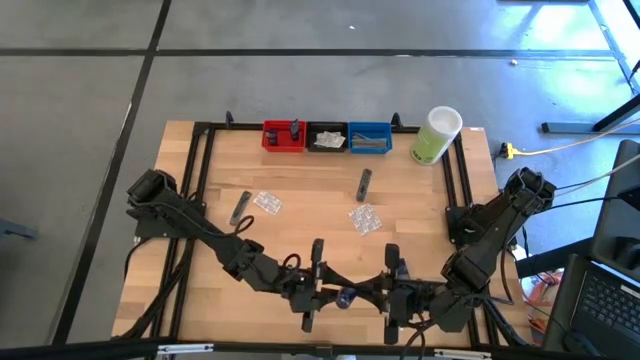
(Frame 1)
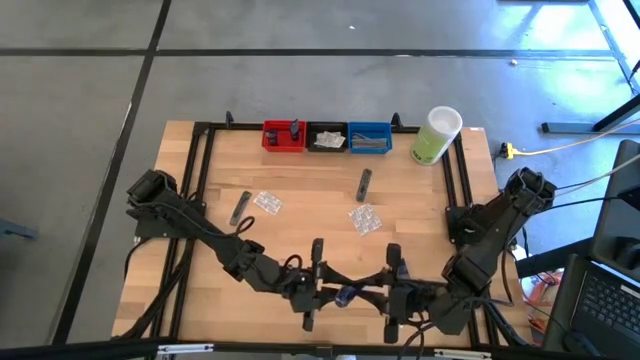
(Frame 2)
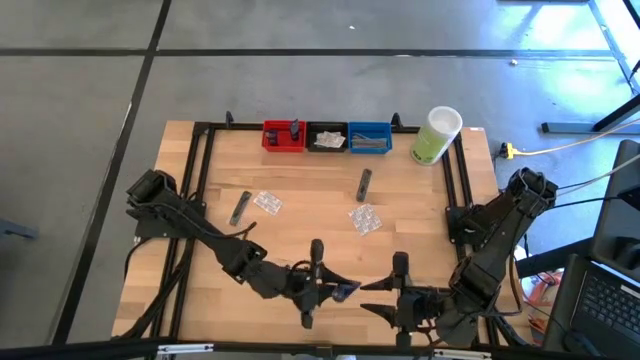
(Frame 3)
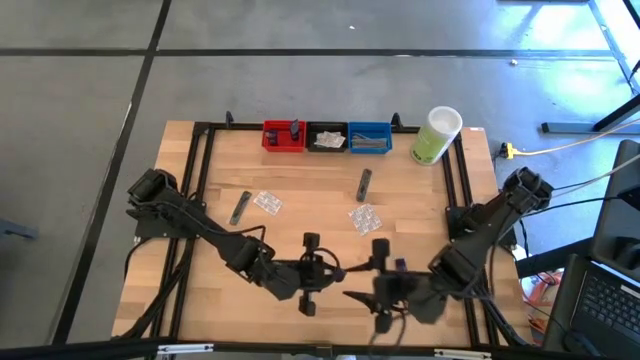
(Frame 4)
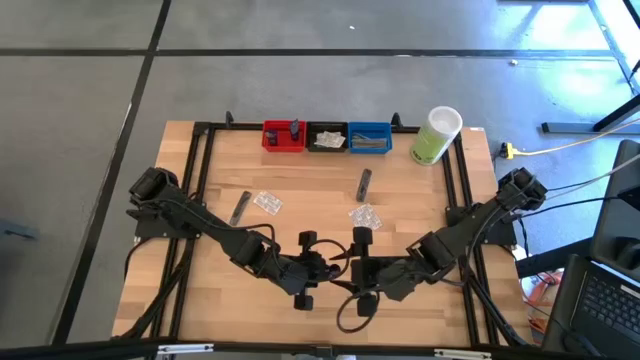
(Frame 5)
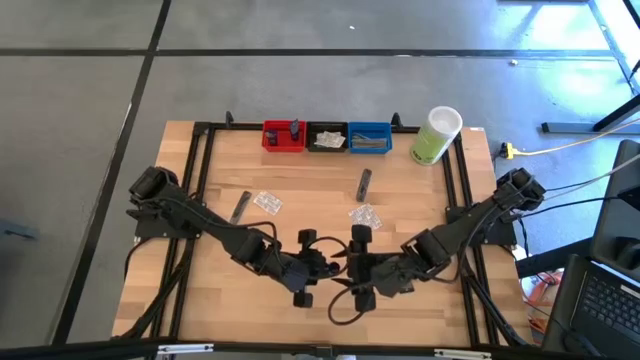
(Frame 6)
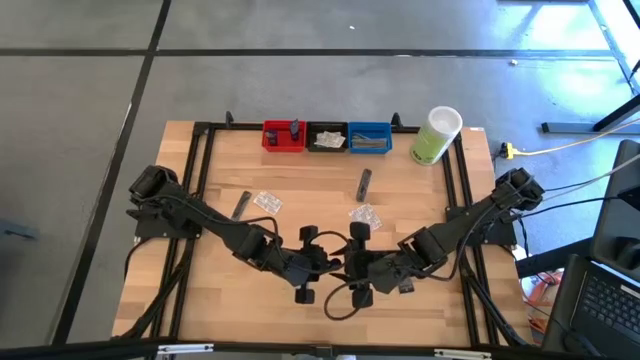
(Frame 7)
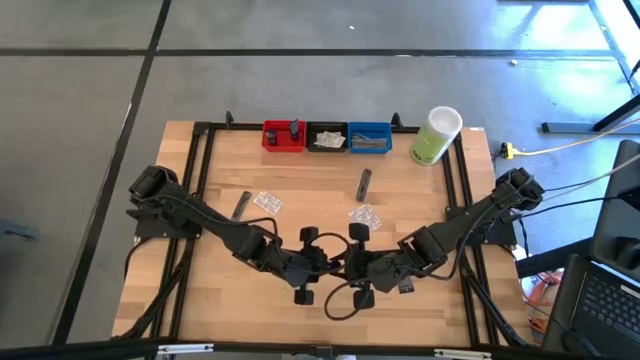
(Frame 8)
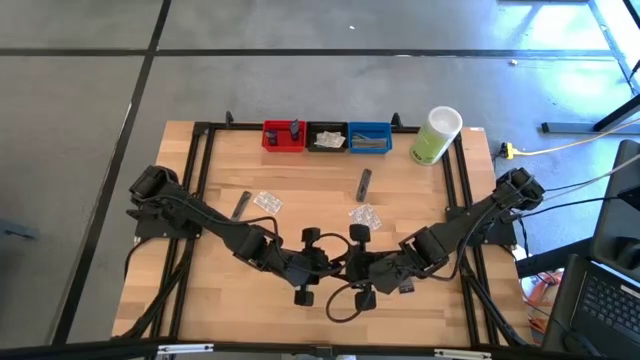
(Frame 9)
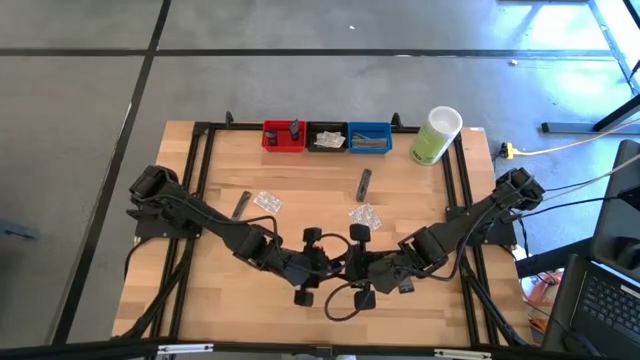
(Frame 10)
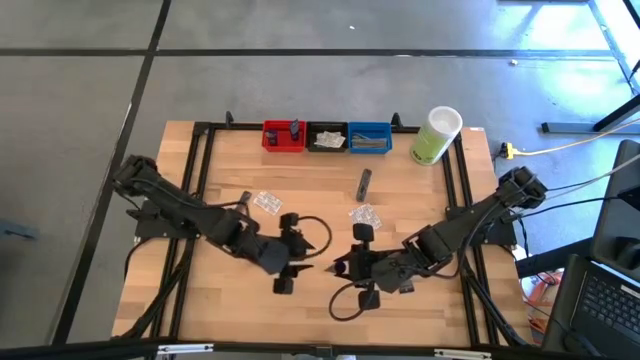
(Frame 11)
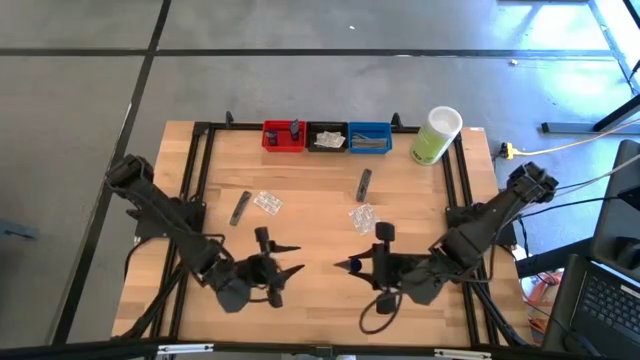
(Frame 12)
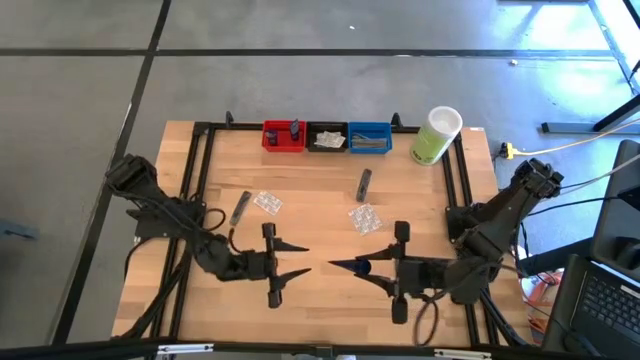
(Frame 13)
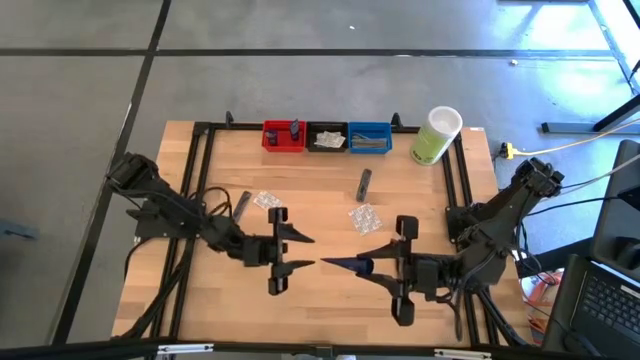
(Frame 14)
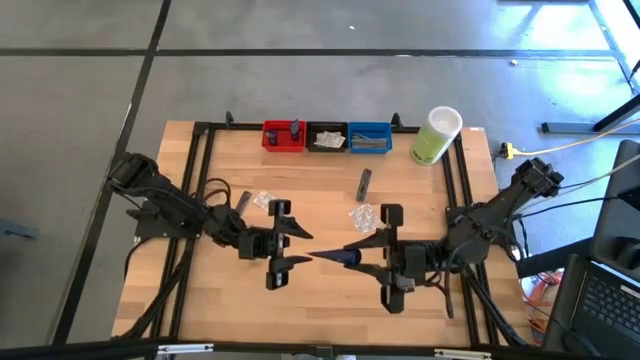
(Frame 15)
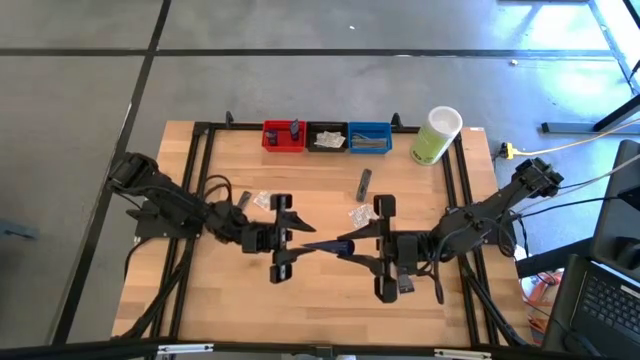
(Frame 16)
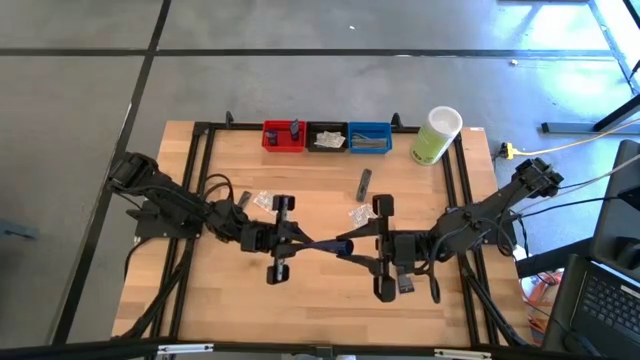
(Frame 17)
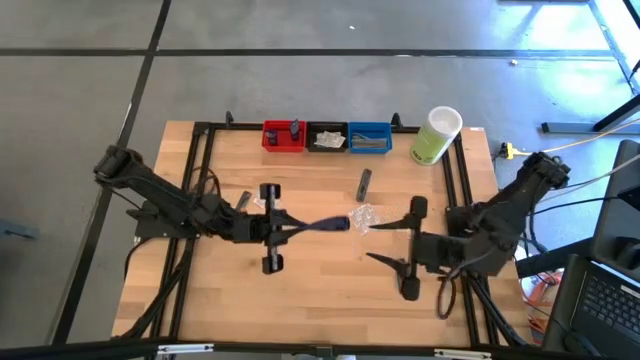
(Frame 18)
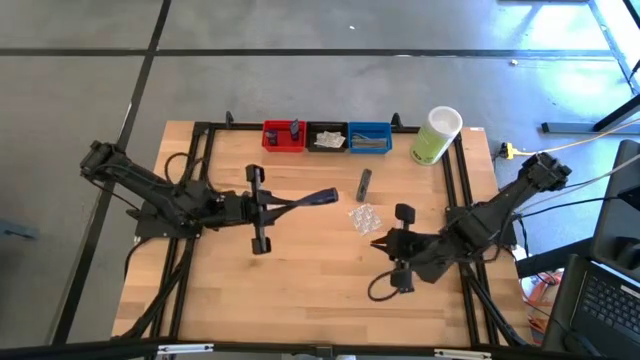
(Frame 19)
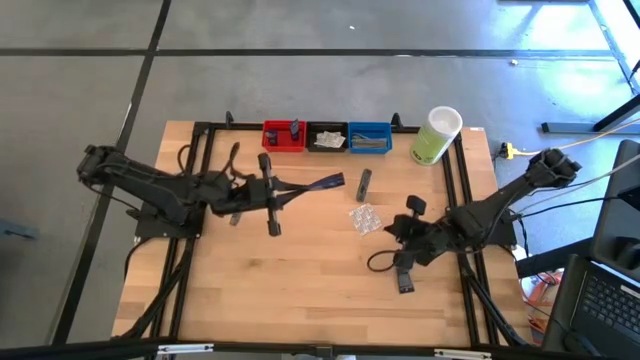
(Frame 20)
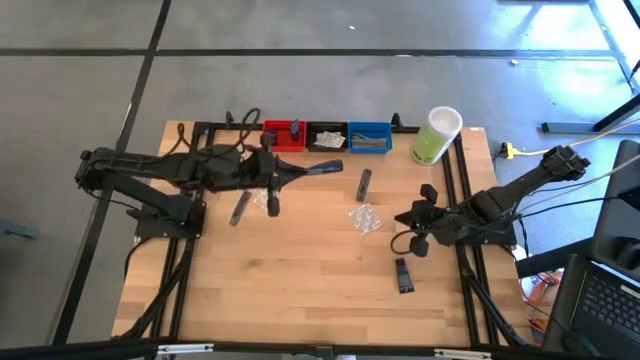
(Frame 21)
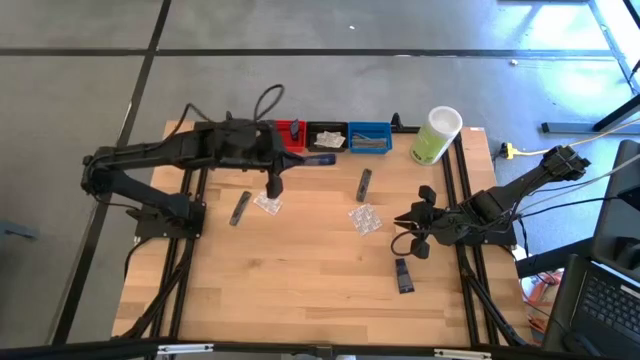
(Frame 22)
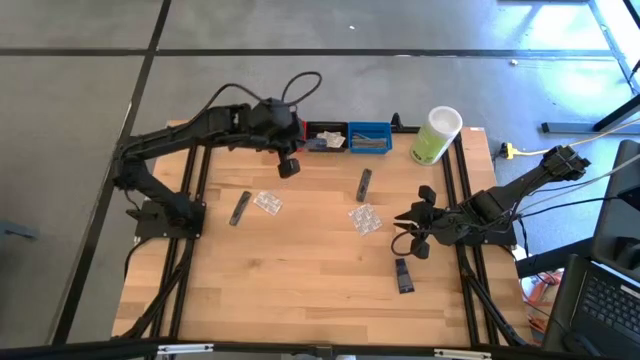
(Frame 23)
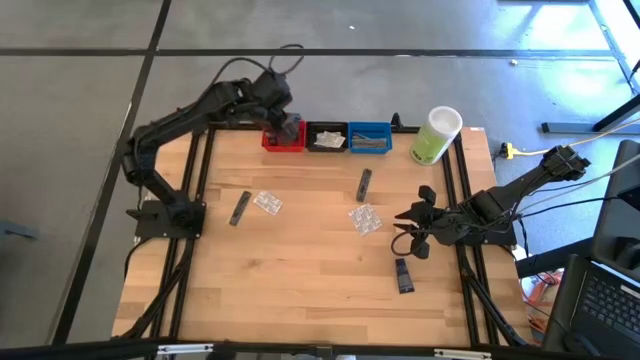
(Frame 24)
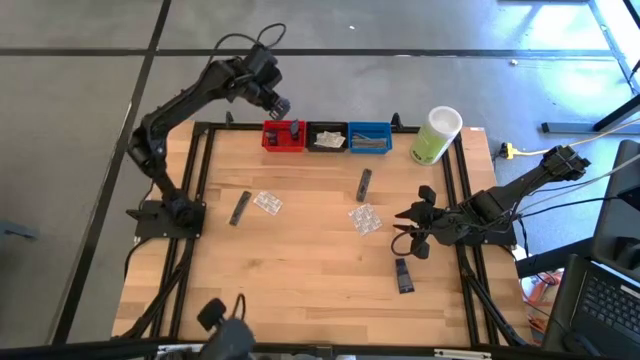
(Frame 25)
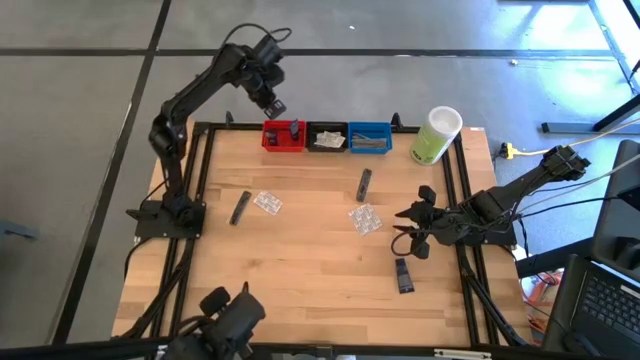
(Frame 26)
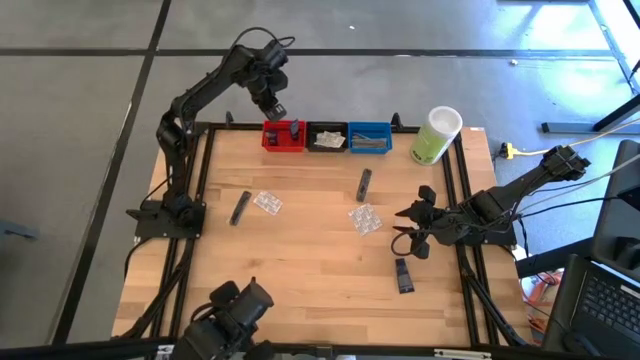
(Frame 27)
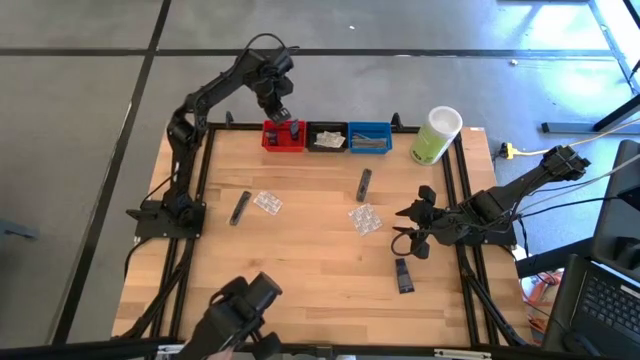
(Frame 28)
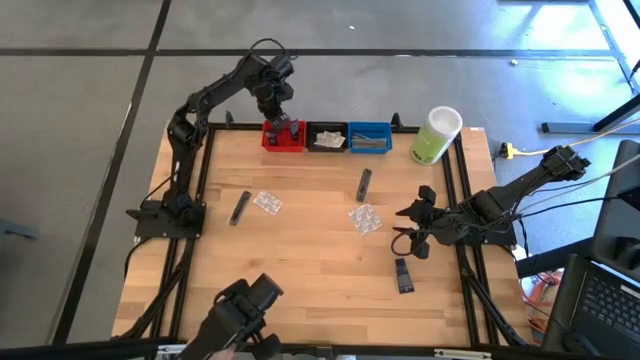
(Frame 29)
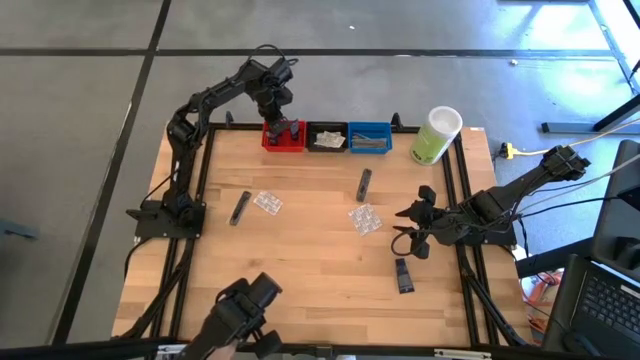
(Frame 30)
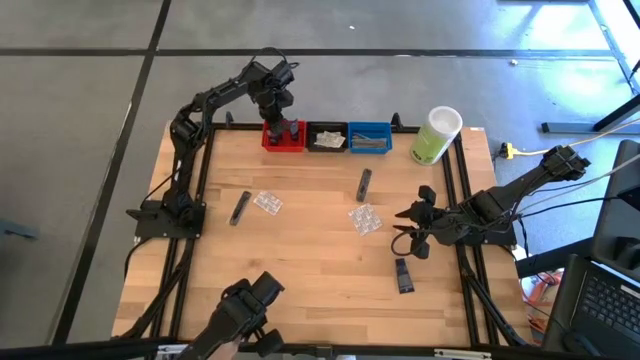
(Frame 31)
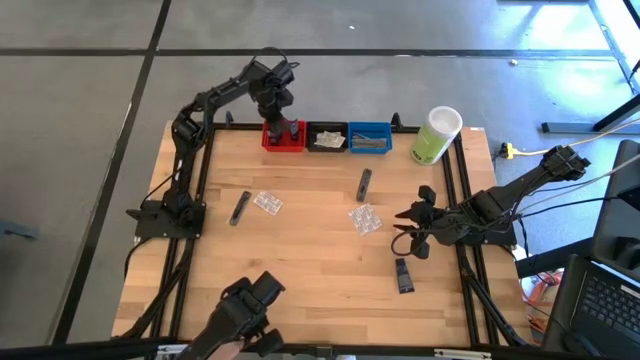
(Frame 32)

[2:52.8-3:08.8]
Task: Pick & Place Travel size toiletries
Put the blue shave cream into the red bin

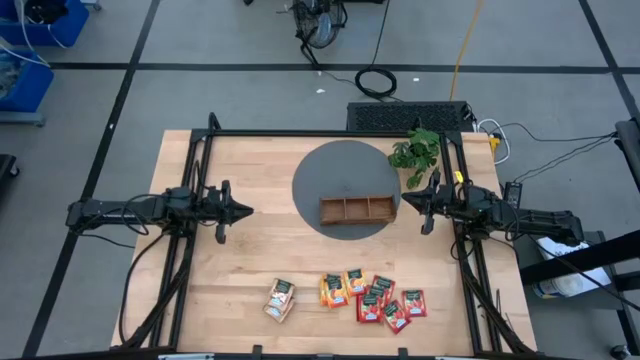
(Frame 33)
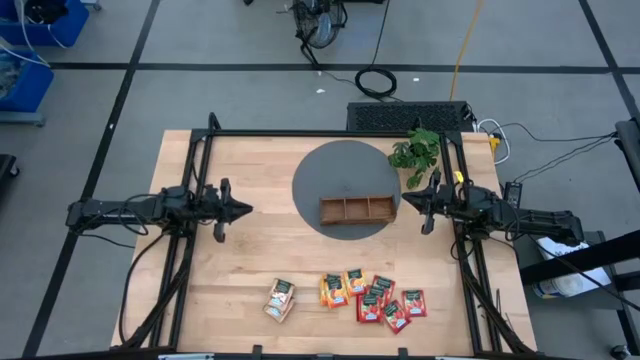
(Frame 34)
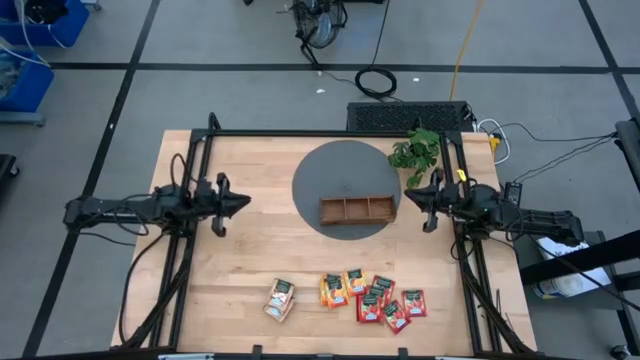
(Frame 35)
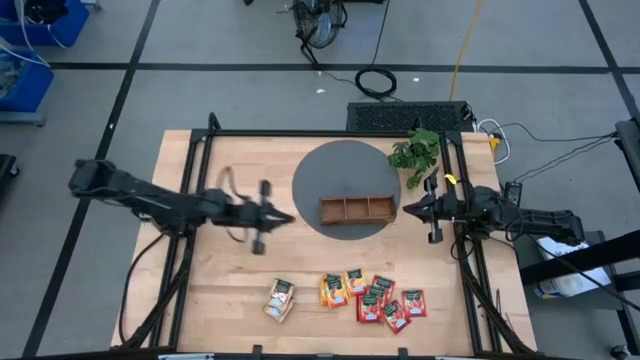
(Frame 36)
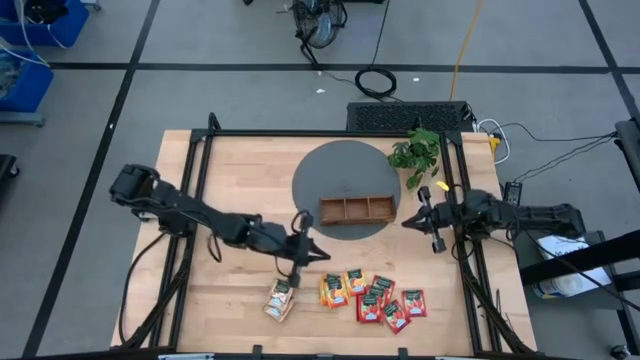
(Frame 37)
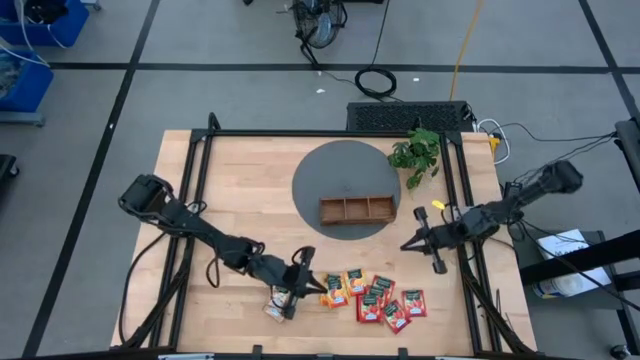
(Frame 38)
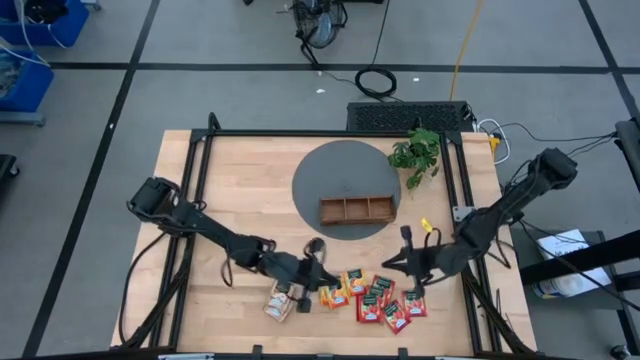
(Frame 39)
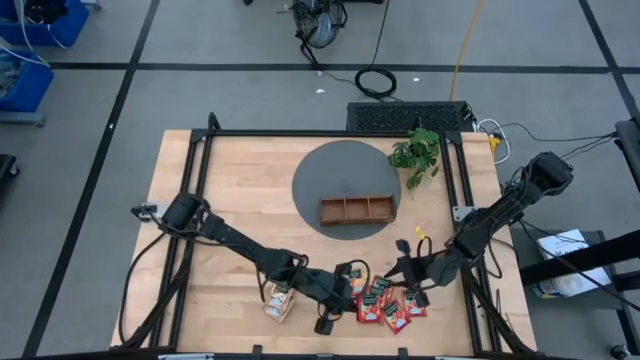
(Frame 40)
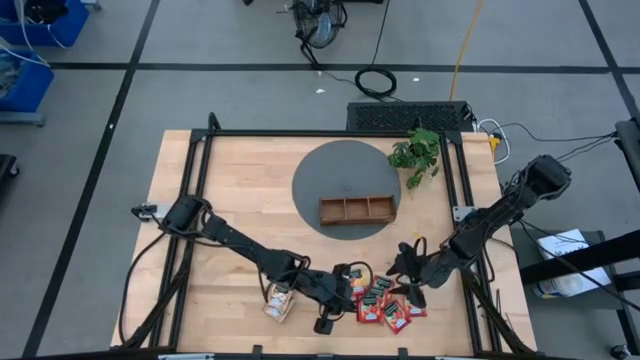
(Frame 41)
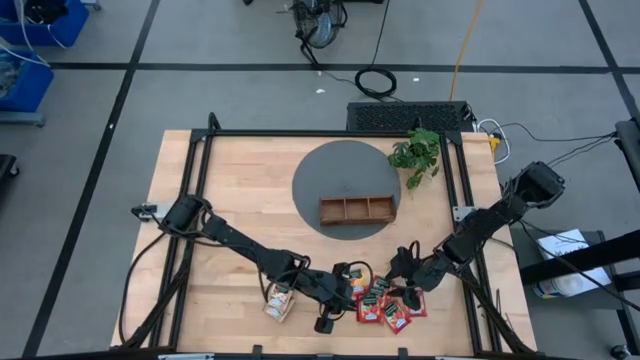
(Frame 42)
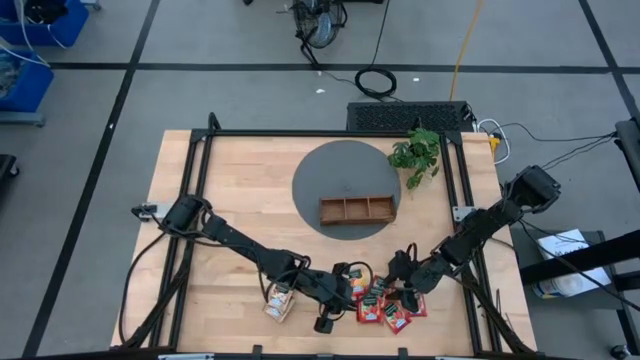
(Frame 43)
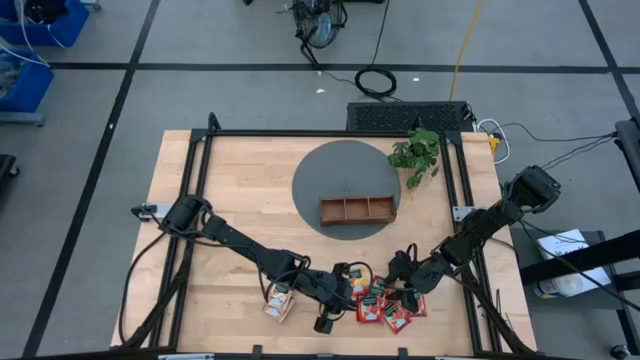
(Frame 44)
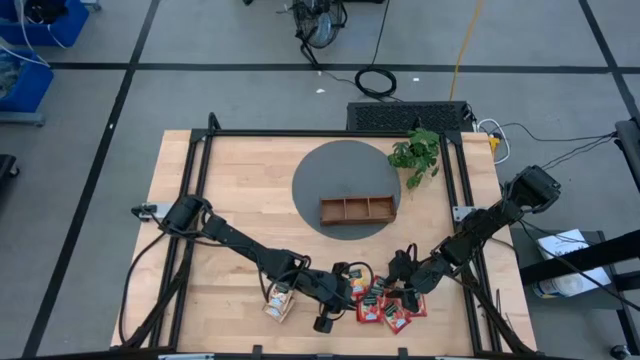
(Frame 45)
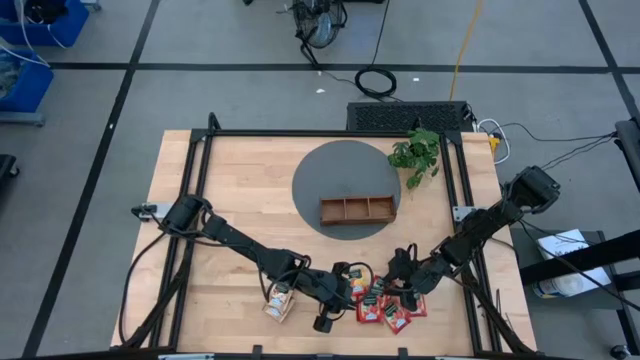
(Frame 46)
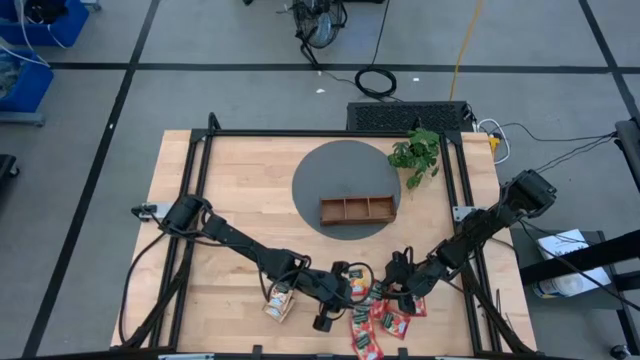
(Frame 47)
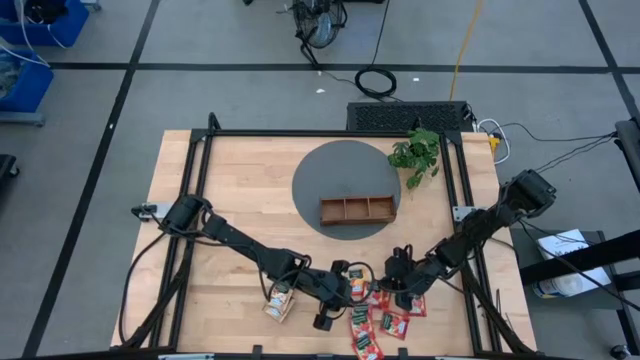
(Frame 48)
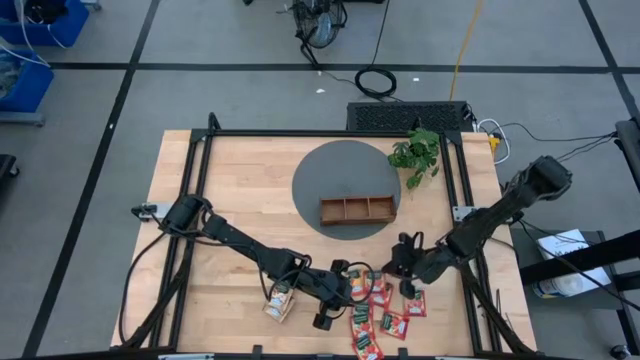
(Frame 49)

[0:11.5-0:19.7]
Task: Pick & Place Tea
Put the red tea bag into the right section of the wooden organizer
